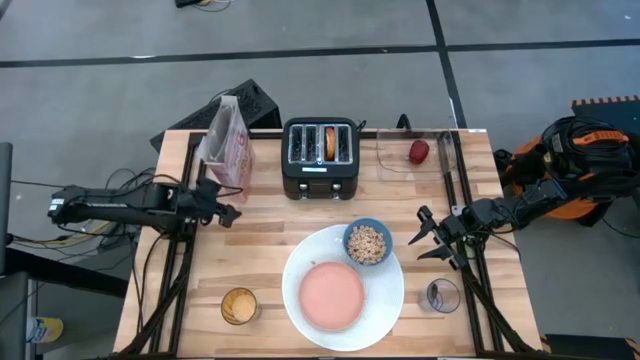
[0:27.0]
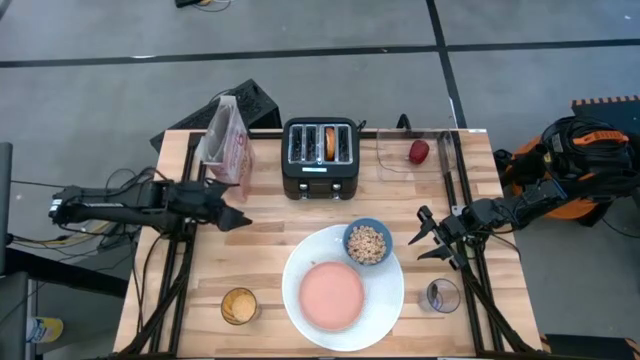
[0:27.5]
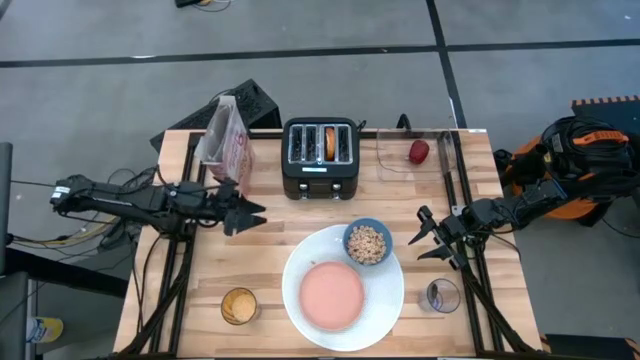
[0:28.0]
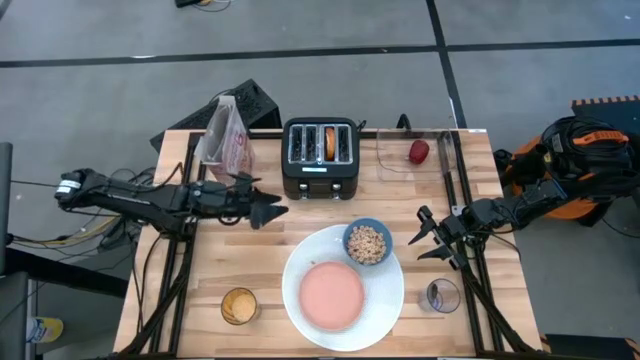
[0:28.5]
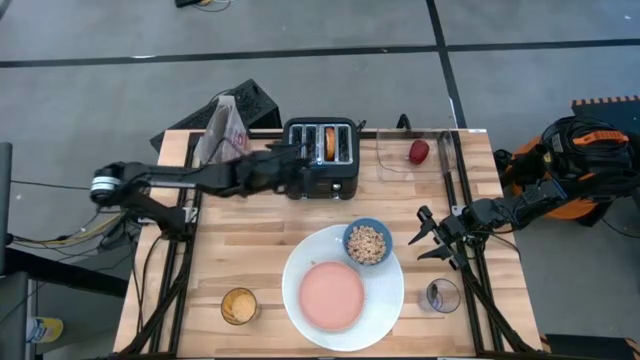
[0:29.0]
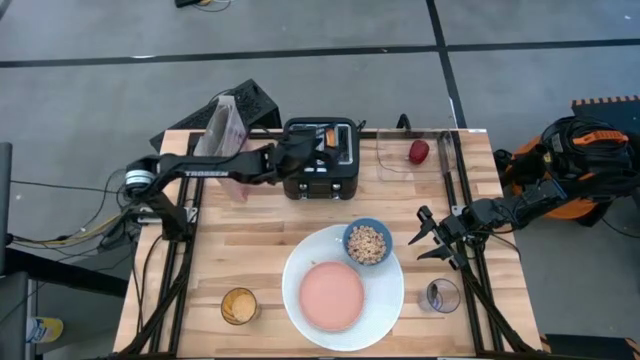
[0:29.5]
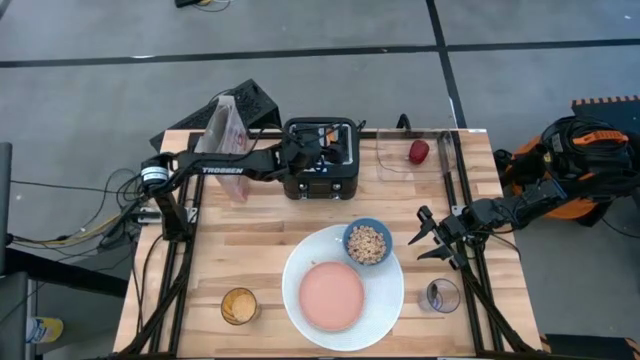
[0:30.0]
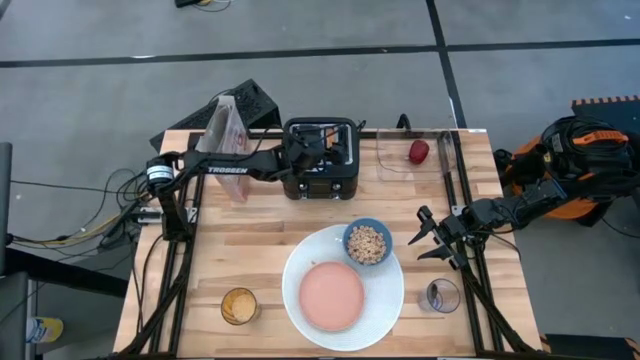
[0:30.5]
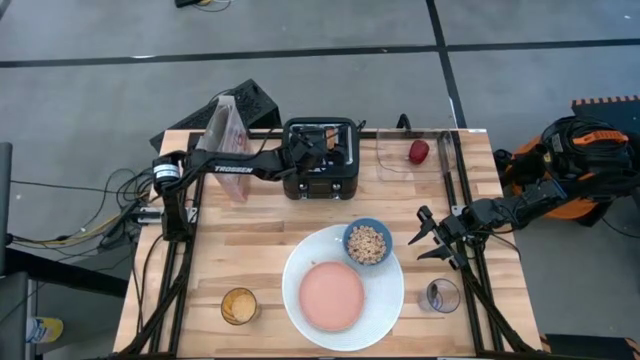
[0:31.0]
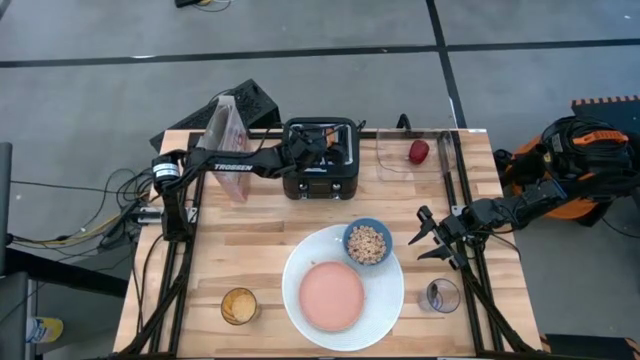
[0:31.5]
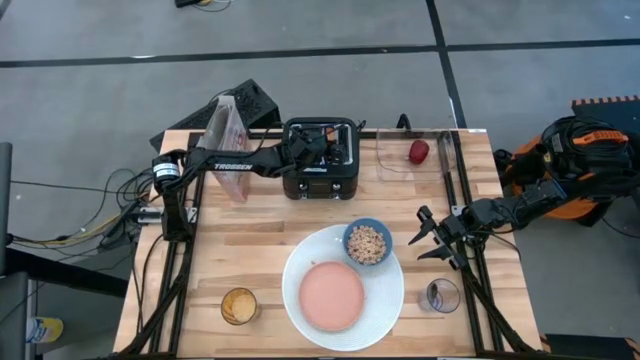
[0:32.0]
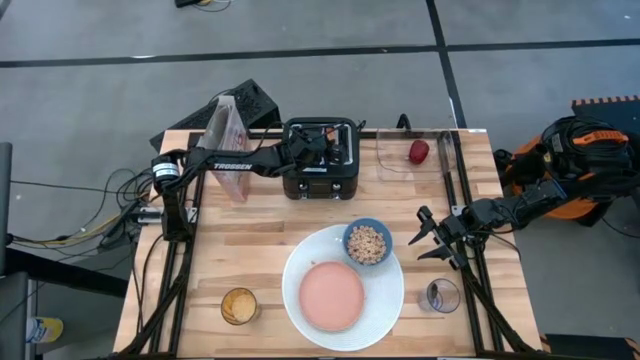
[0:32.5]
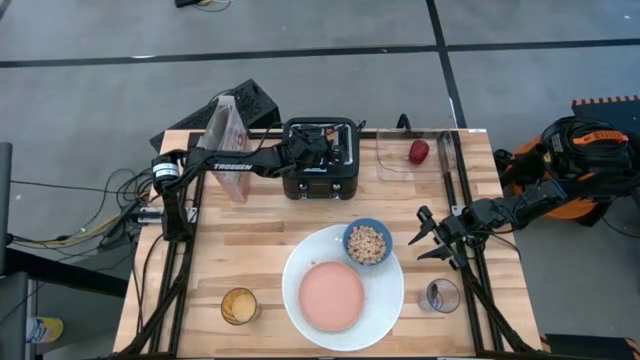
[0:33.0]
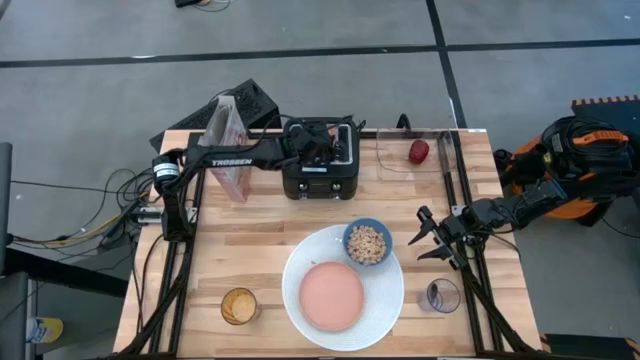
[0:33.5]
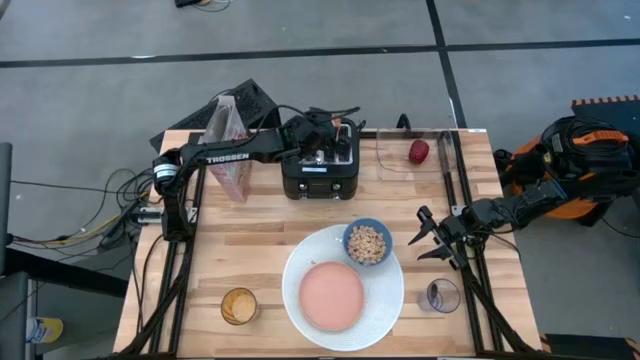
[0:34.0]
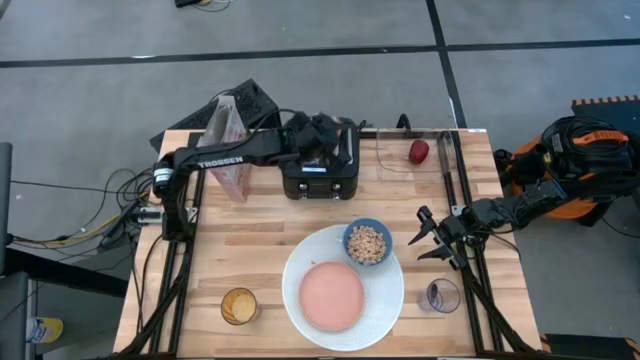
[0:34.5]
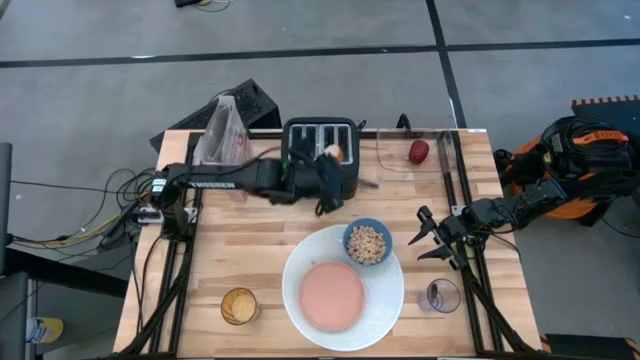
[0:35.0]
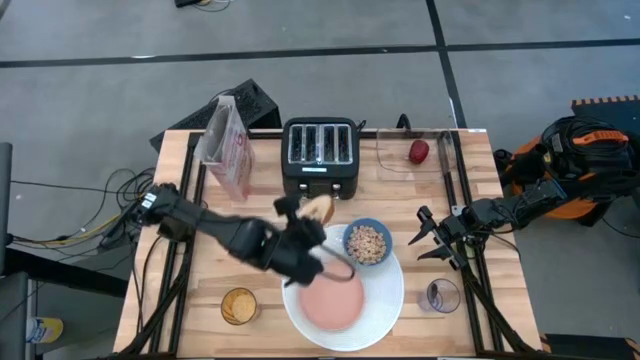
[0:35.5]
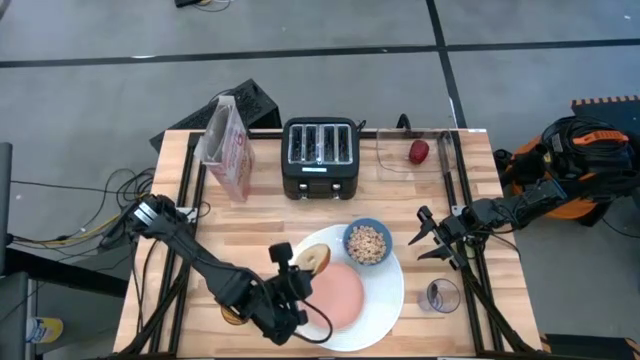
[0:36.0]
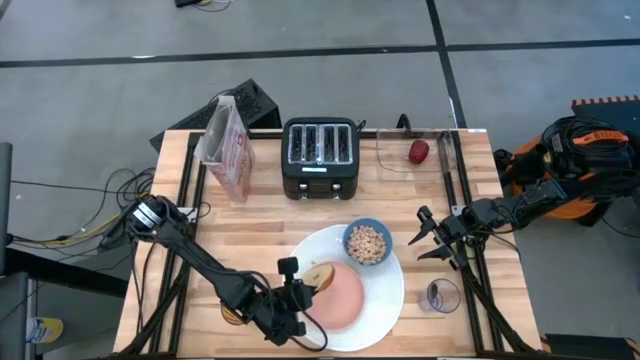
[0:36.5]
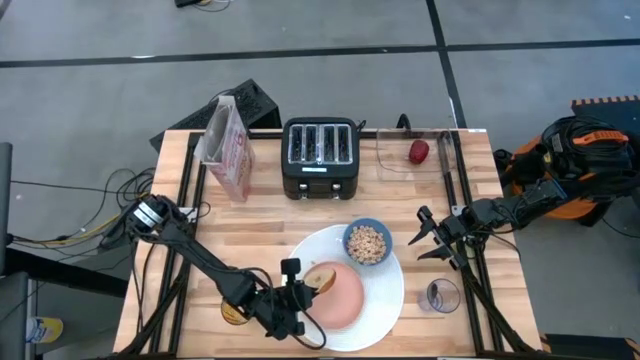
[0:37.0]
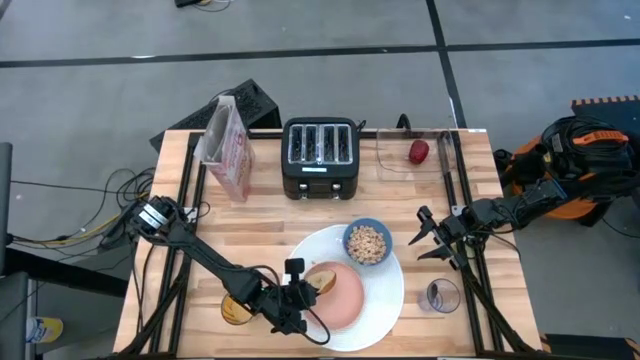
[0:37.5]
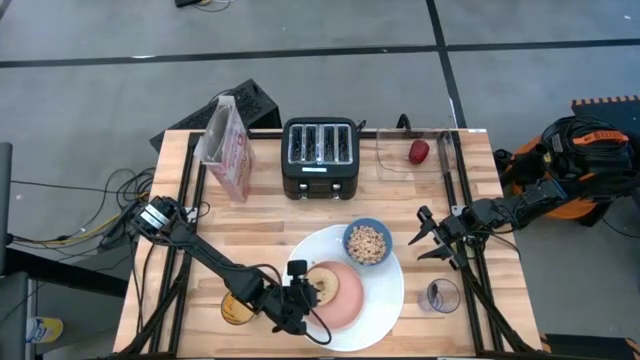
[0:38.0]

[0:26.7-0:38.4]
Task: Arrange a breakfast setting
Remove the sliced bagel from the toaster and put it on the pink plate

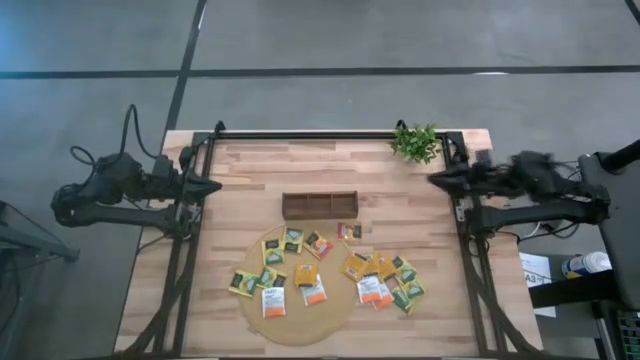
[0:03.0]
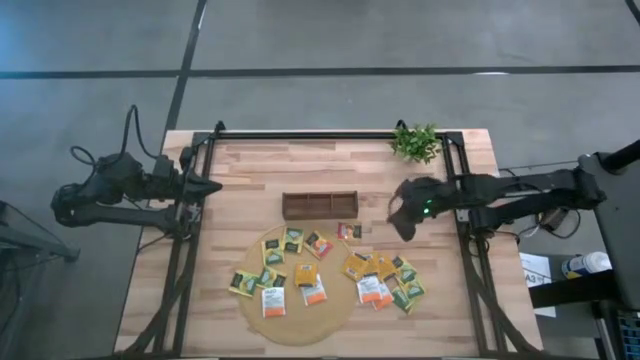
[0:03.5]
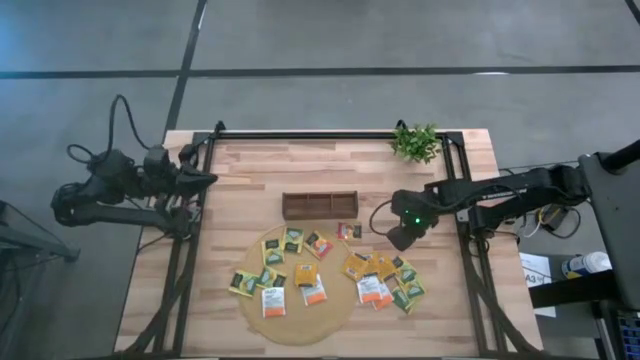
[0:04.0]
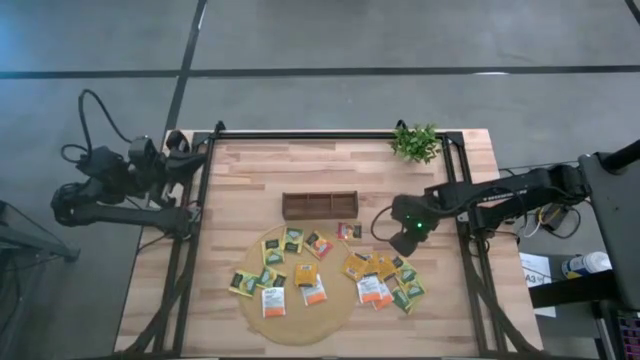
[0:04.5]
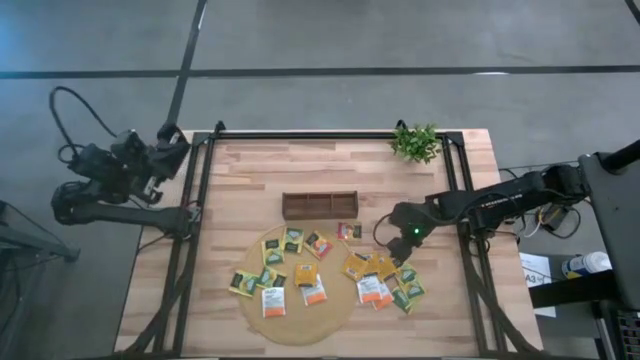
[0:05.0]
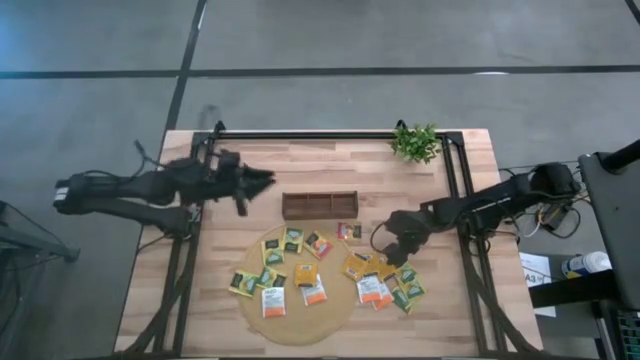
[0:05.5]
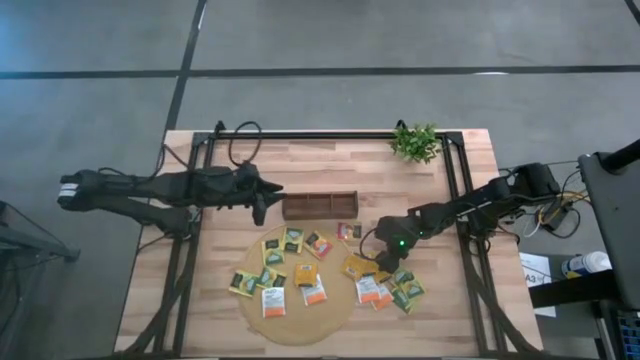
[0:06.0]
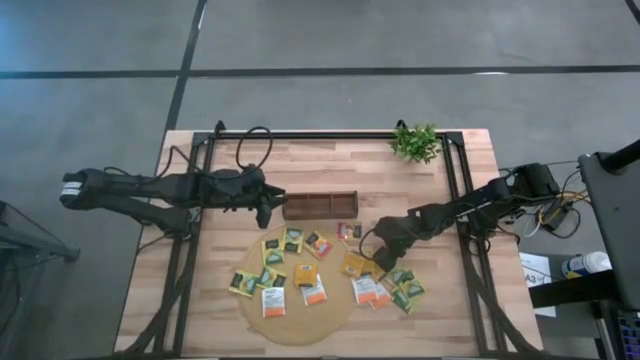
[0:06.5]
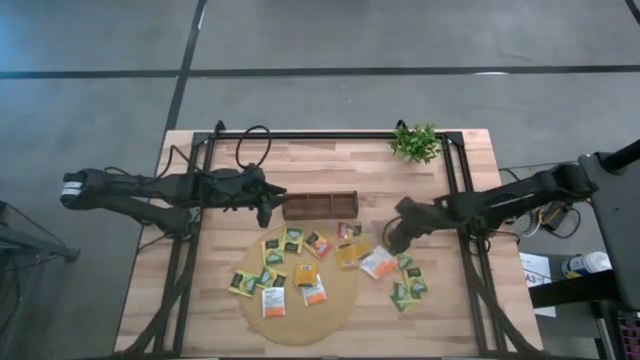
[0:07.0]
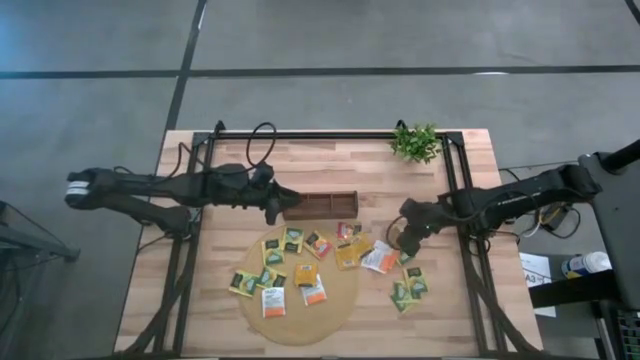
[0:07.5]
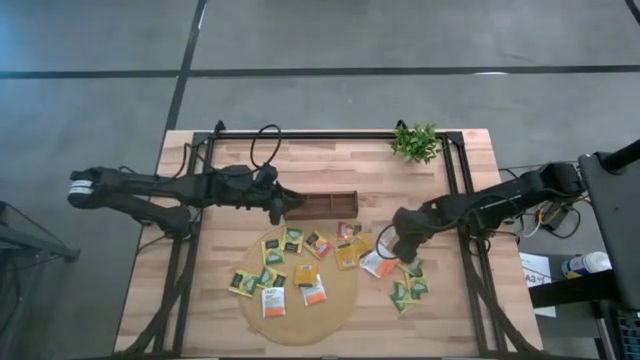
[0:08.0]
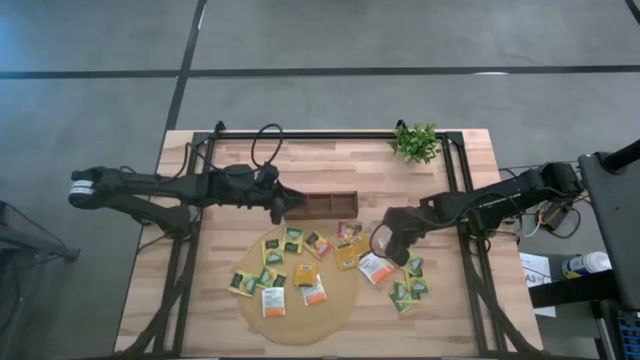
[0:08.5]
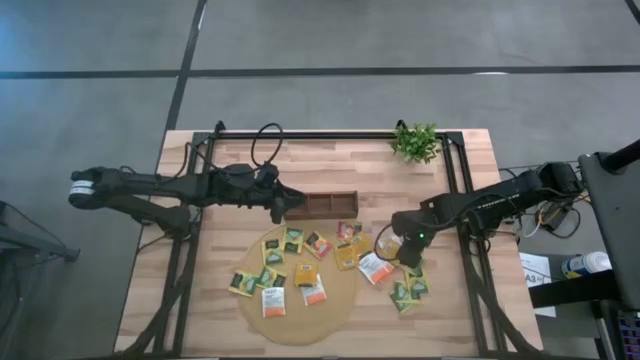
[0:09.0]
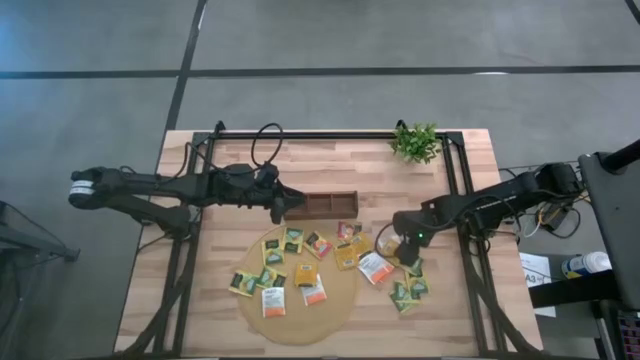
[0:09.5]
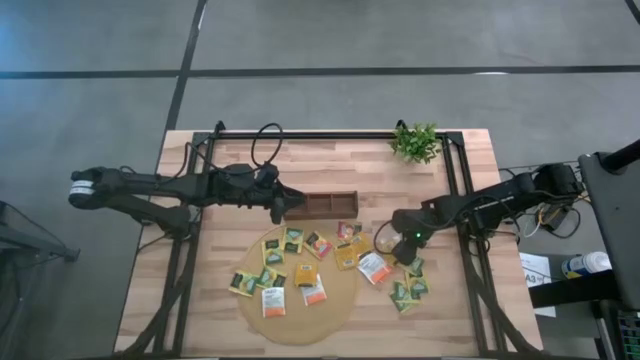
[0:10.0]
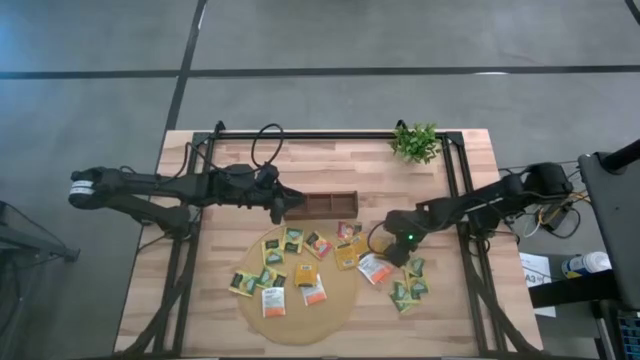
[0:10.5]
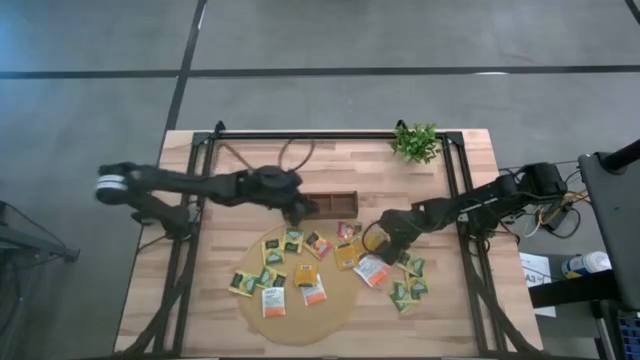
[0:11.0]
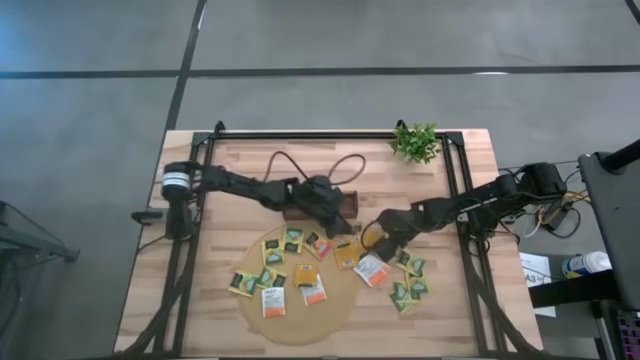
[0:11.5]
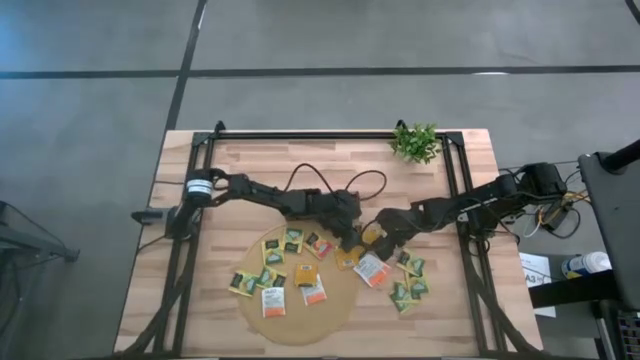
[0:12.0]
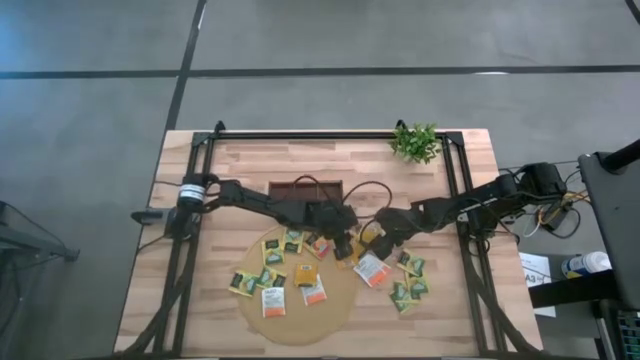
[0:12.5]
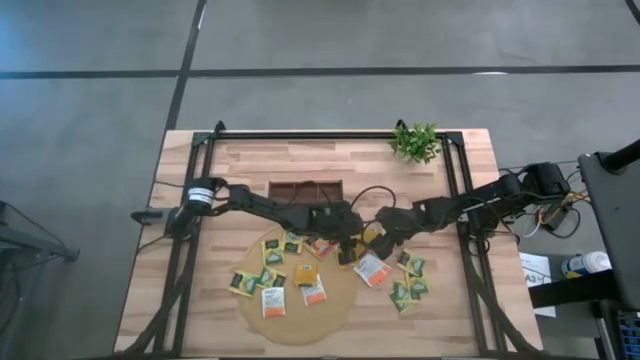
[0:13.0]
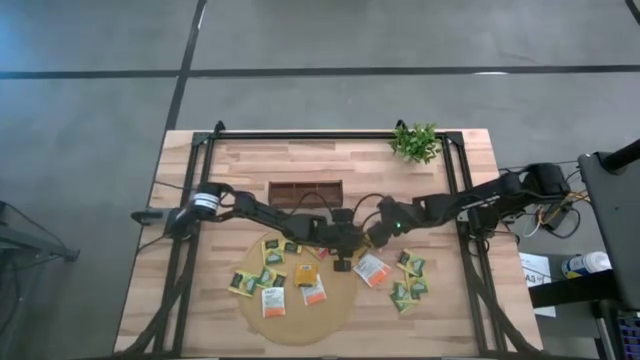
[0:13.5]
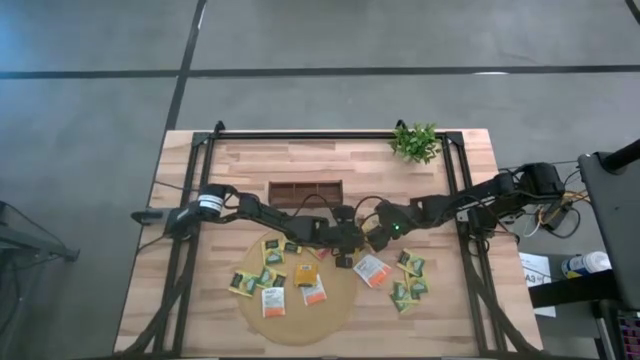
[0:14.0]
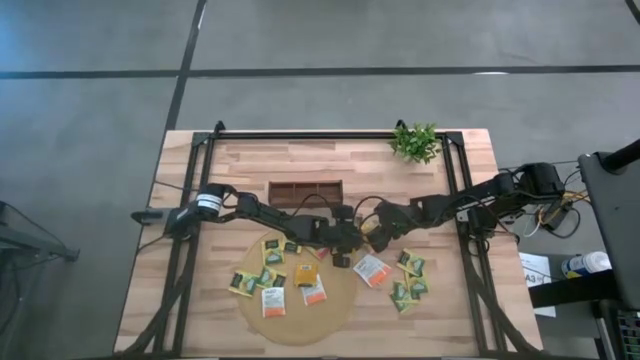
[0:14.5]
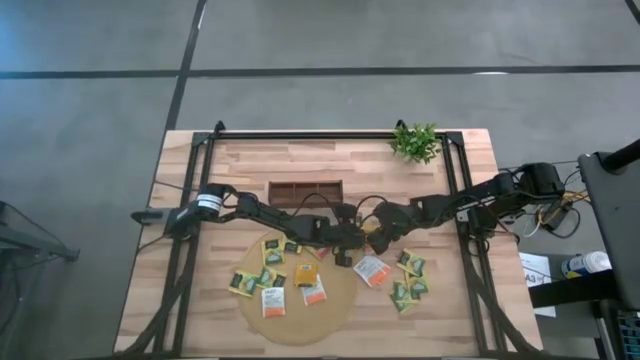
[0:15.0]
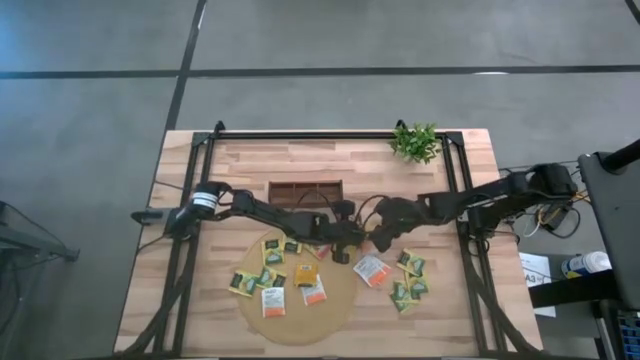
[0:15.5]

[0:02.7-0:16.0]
Task: Pick & Place Tea
Put the yellow tea bag into the middle section of the wooden organizer
